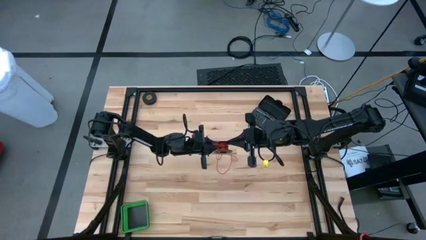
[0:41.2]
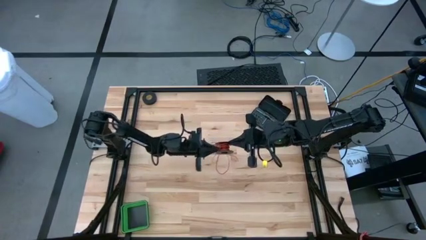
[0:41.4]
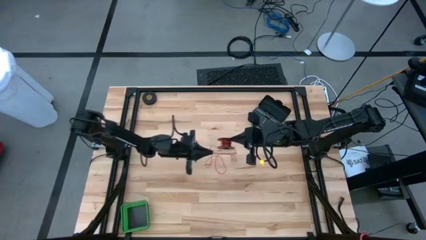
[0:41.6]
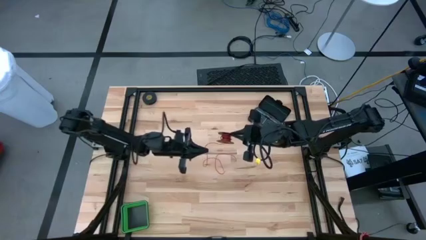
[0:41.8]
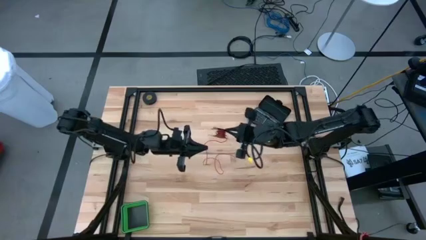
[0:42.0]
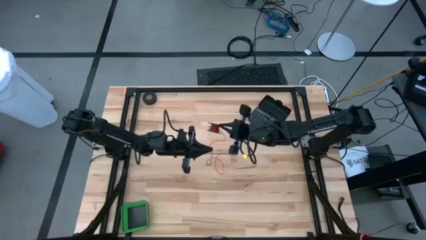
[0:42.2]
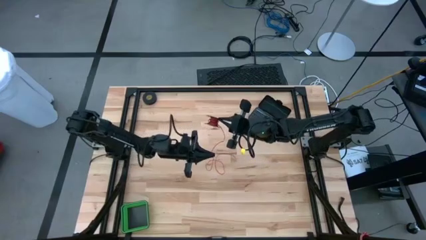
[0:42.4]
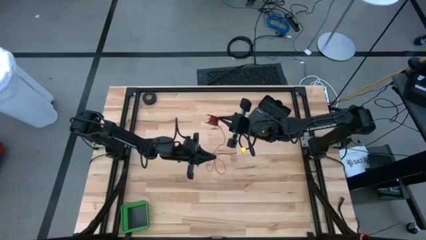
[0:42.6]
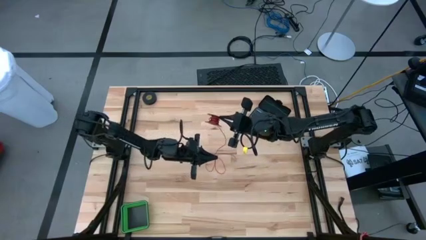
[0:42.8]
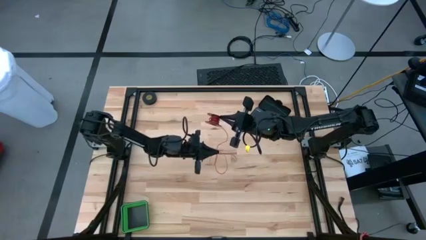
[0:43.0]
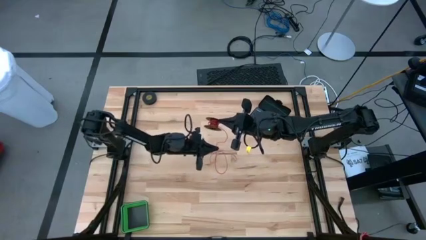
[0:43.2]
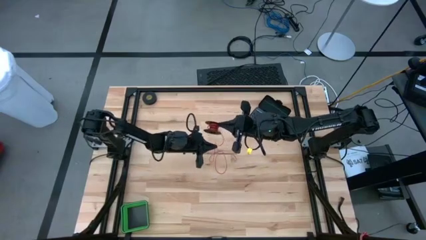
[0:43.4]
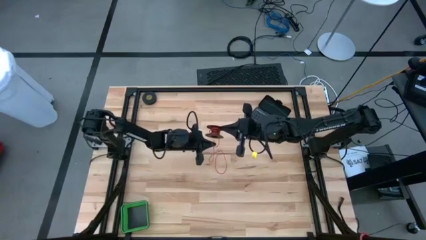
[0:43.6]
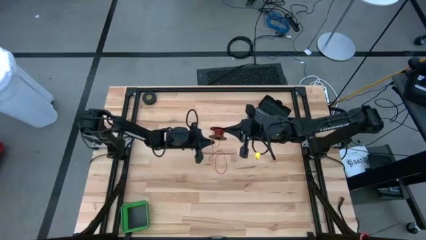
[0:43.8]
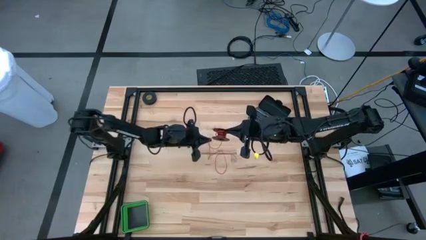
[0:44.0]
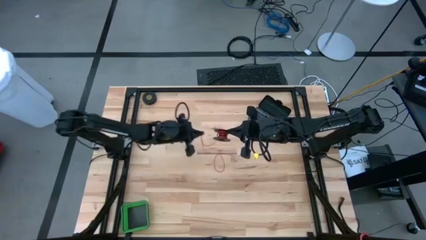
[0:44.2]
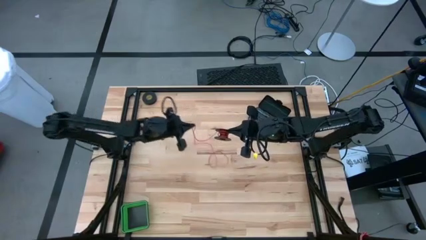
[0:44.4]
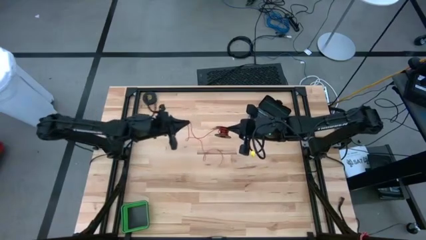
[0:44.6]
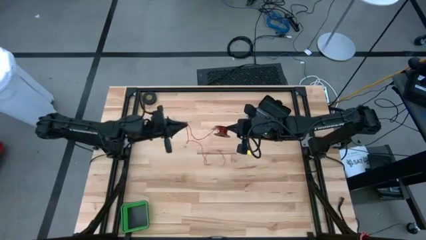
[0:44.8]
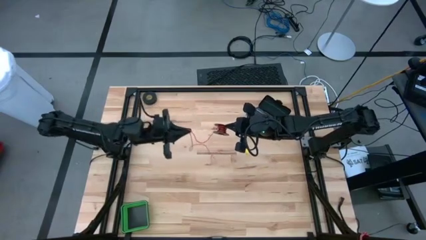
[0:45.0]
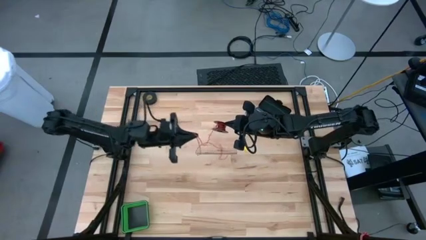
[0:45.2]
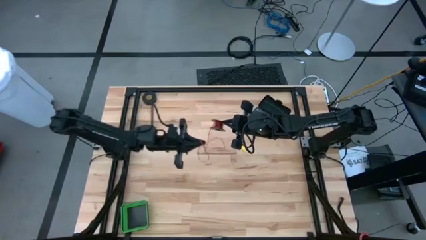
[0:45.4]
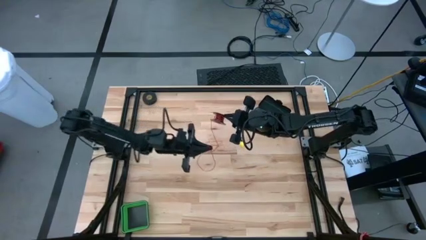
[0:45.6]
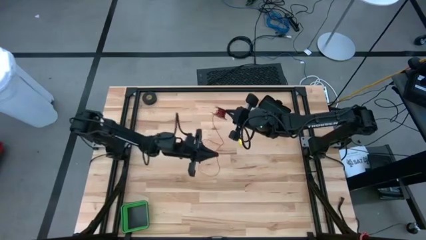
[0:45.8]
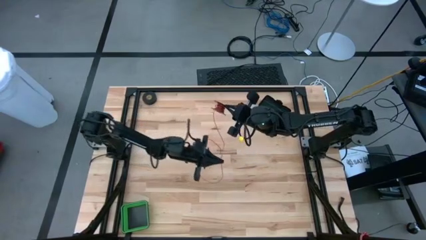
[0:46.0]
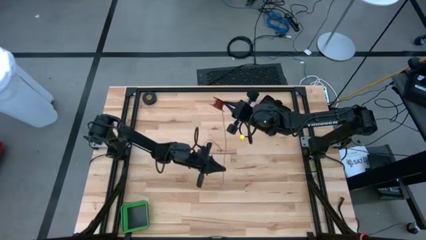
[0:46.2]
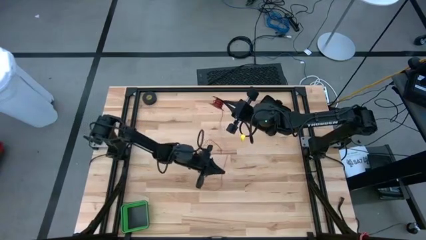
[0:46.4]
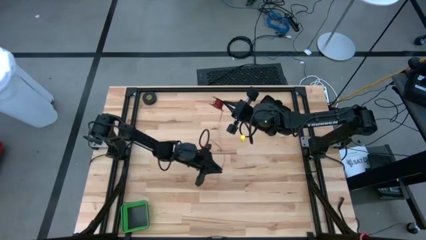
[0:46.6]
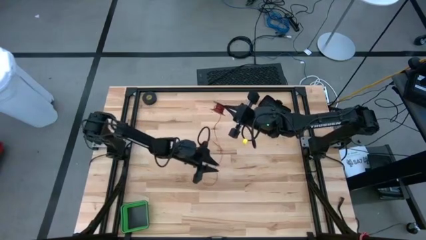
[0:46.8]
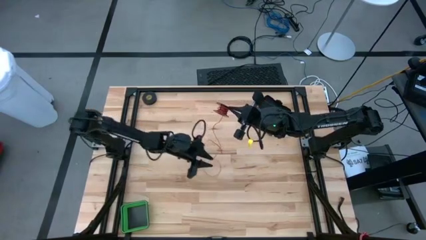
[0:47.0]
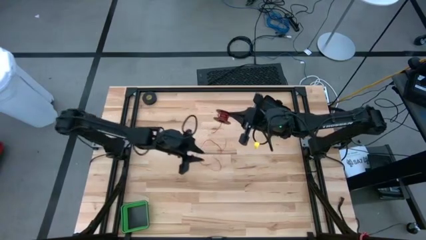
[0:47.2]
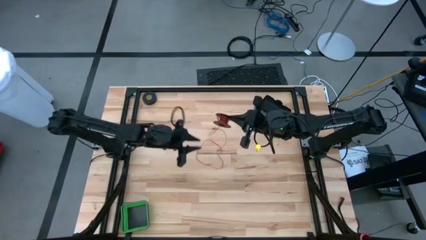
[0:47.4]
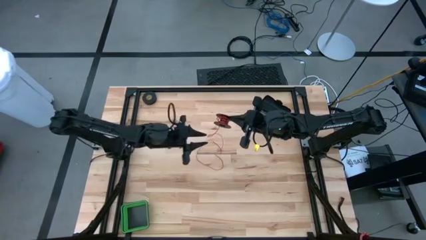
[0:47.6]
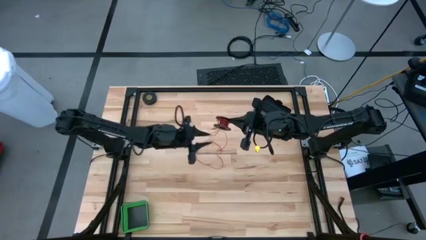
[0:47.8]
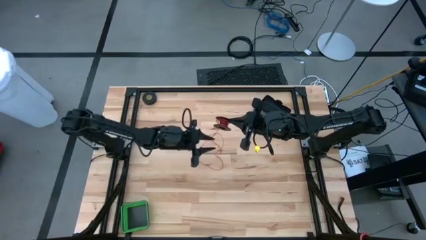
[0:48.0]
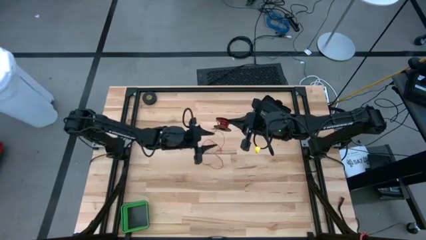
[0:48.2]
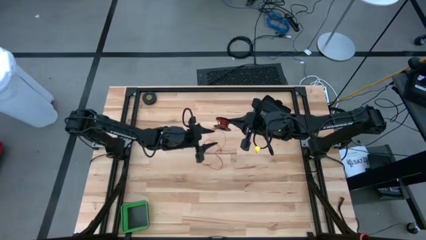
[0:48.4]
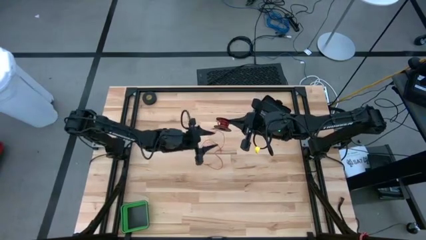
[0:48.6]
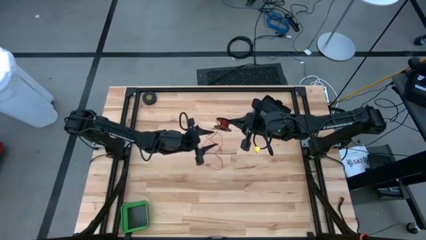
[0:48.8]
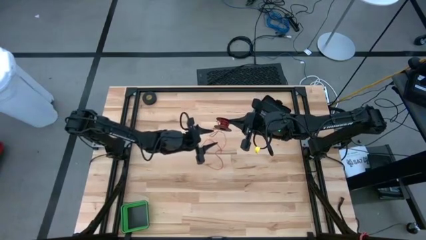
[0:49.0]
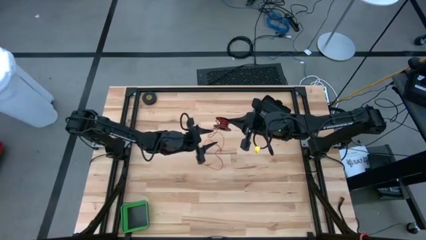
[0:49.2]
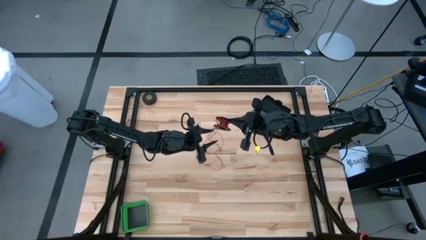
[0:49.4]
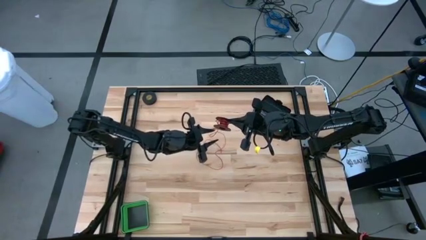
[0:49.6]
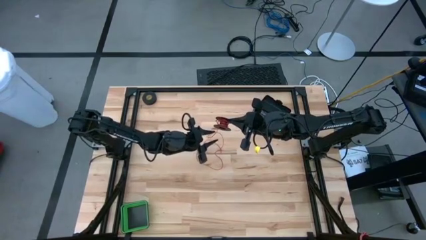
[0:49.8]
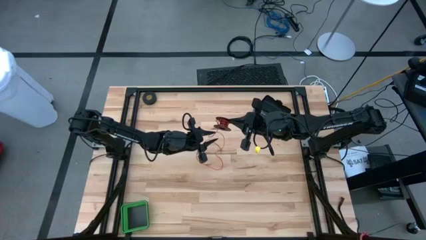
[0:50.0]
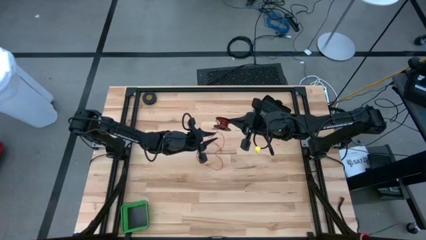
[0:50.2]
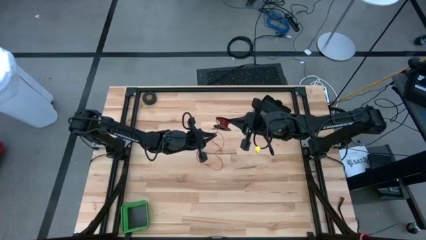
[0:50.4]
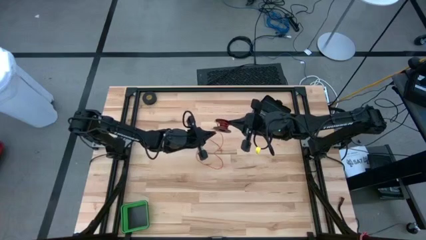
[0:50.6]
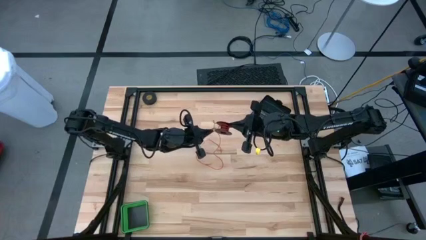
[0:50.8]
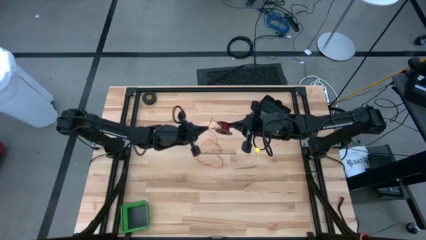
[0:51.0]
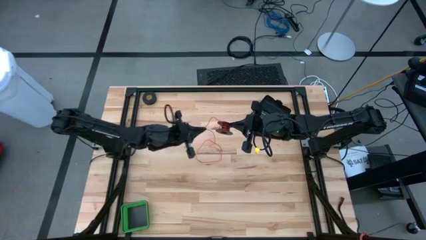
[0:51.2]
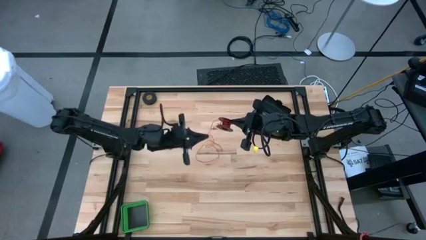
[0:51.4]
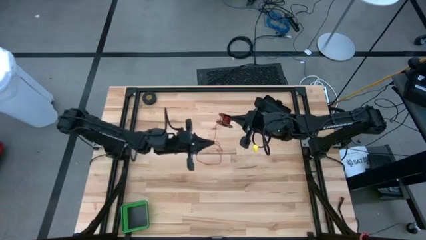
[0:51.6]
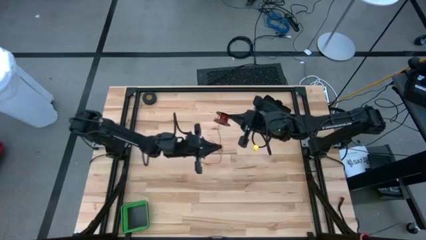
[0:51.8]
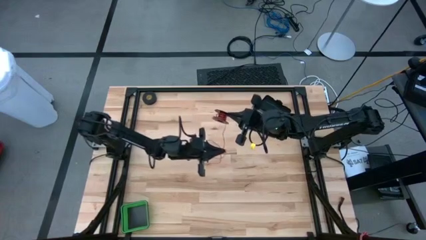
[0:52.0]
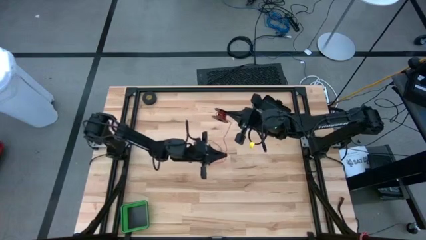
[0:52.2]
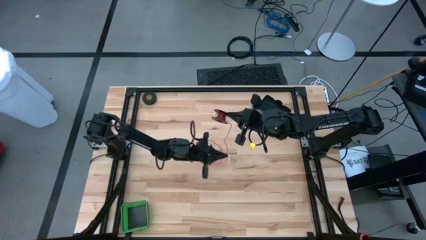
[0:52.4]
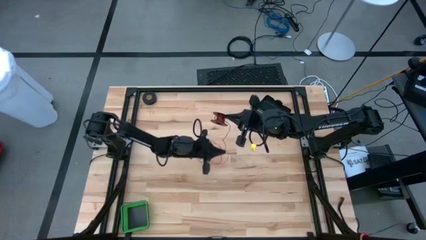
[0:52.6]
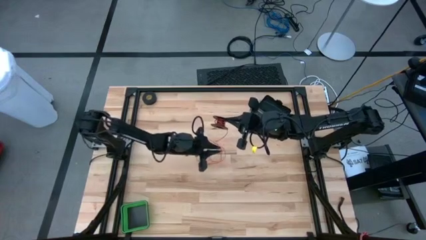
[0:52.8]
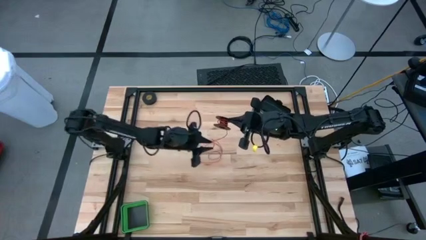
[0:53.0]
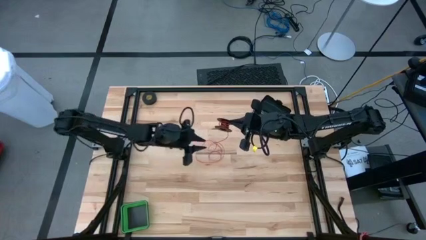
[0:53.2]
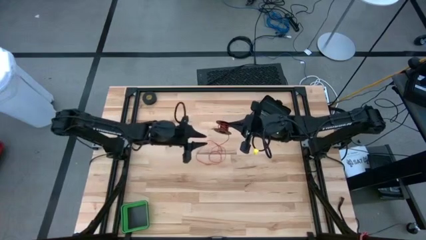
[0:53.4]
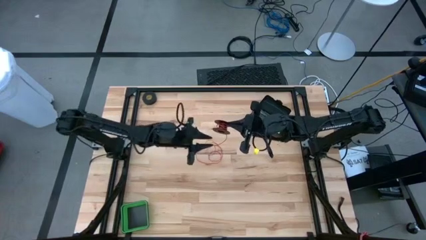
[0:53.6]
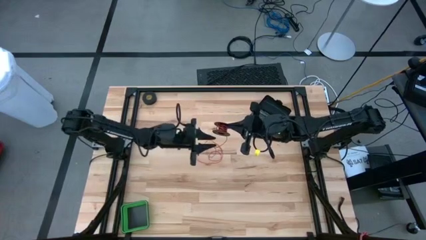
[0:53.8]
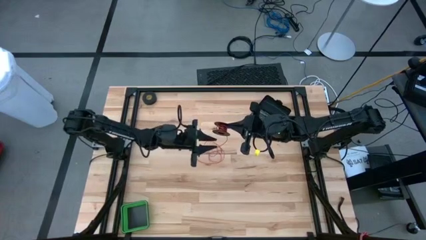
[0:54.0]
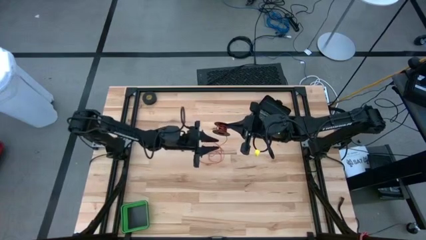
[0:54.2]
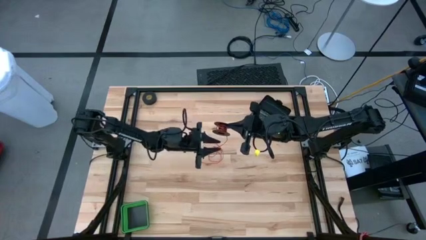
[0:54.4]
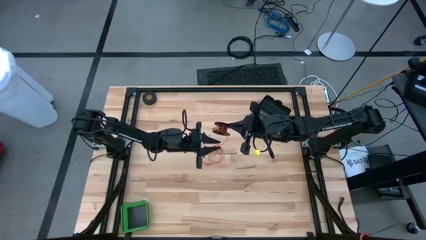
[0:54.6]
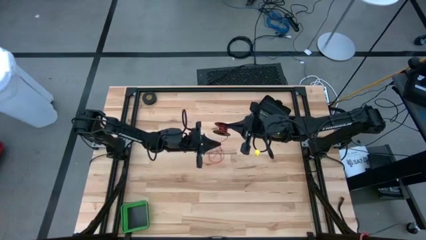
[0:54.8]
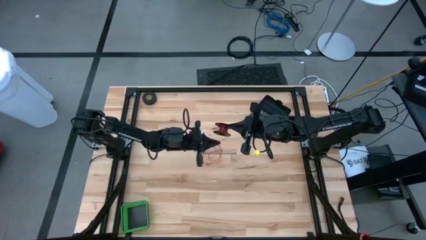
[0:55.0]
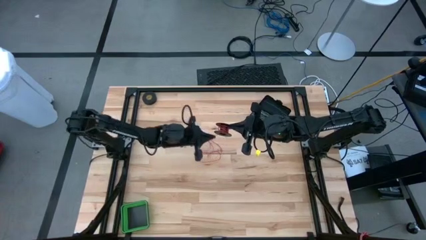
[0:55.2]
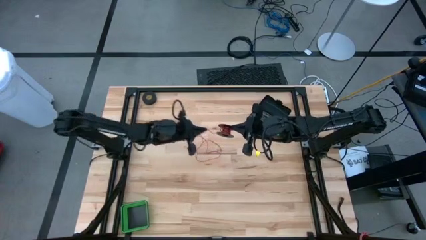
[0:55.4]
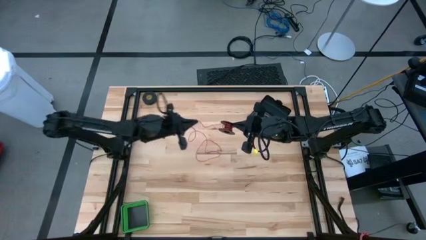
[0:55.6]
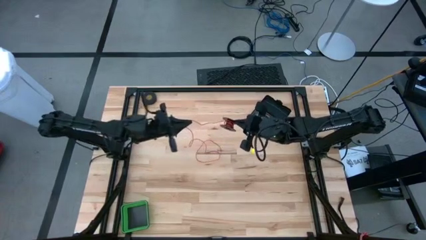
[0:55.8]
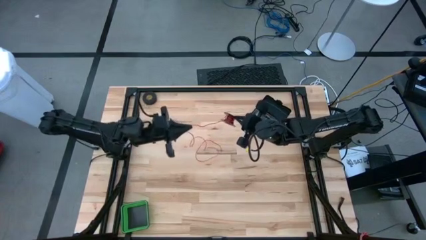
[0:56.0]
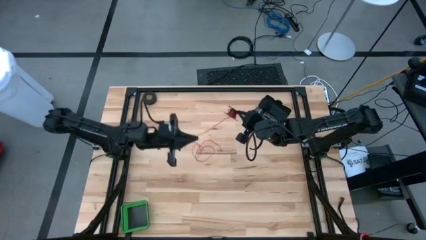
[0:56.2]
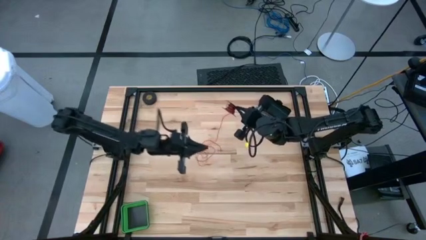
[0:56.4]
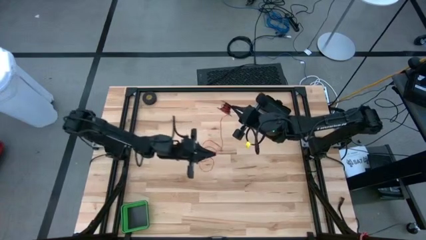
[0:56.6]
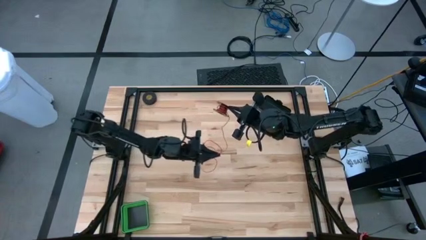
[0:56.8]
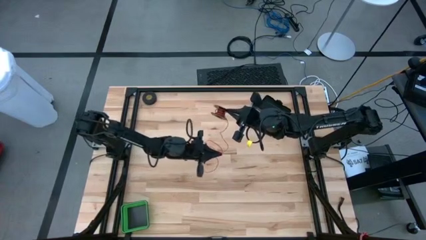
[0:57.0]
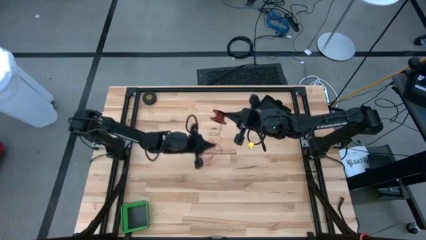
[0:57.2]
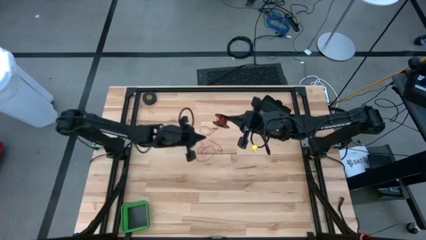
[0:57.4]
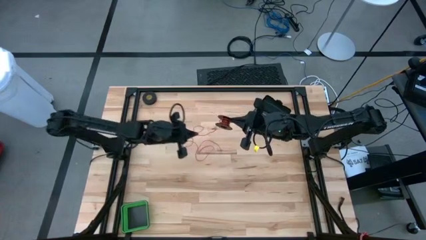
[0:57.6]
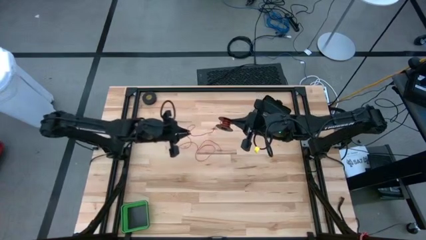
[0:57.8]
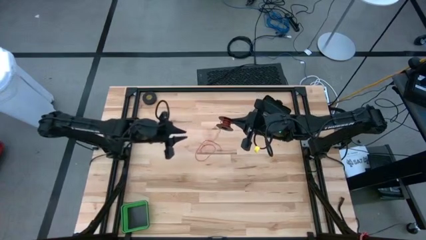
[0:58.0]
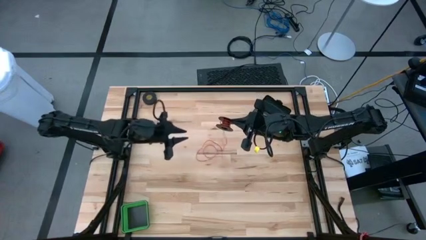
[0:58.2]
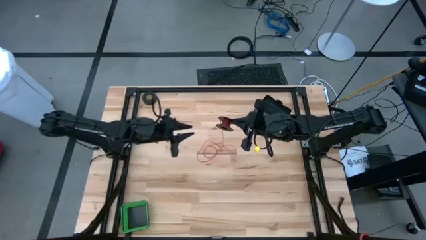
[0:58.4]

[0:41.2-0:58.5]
Task: Coil cords
Uncoil the red wire from the spool
